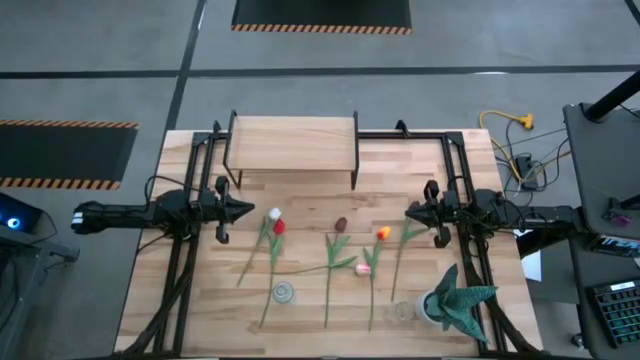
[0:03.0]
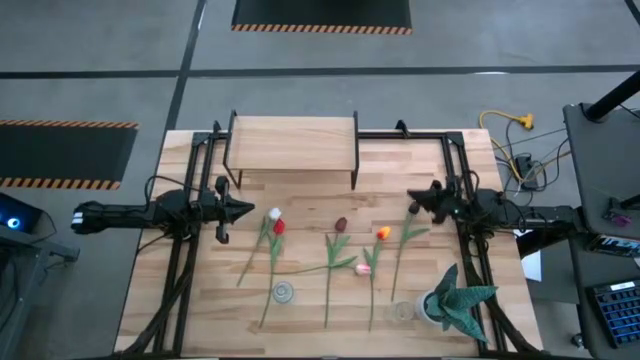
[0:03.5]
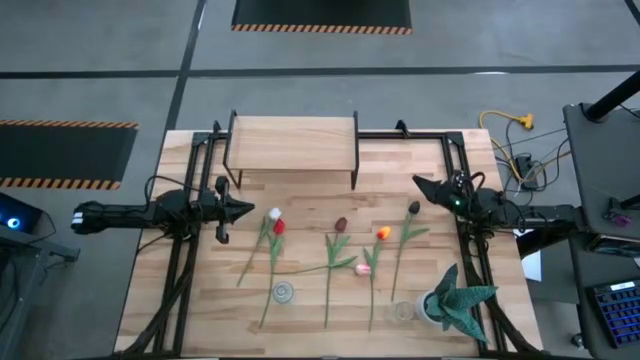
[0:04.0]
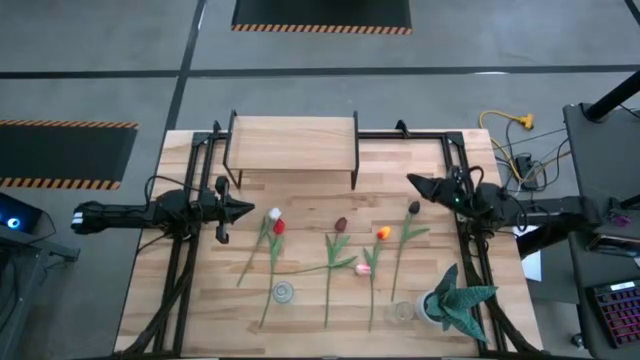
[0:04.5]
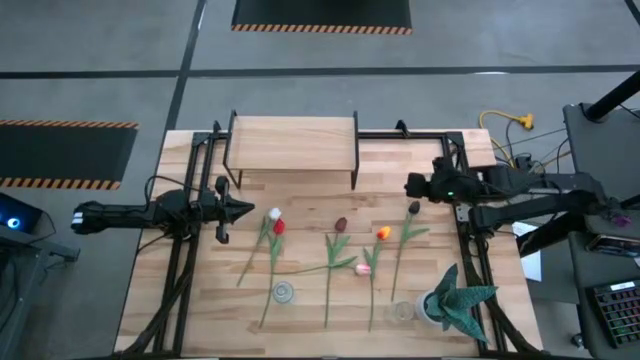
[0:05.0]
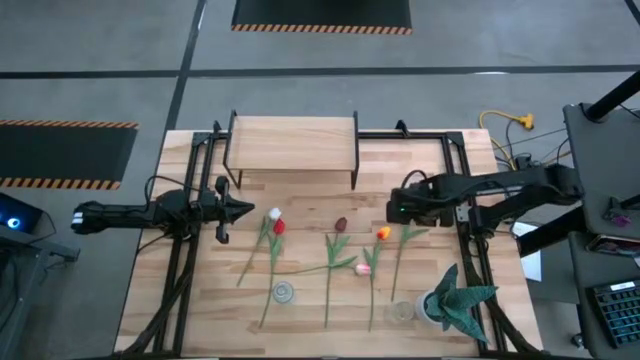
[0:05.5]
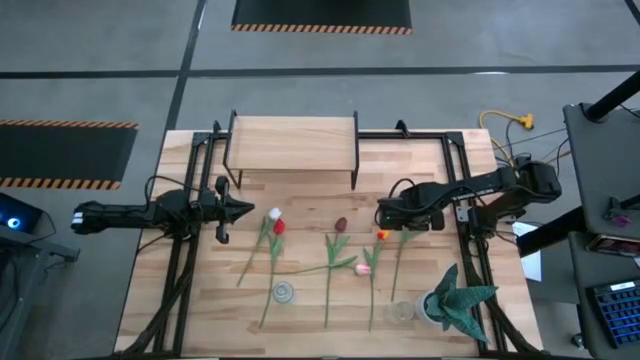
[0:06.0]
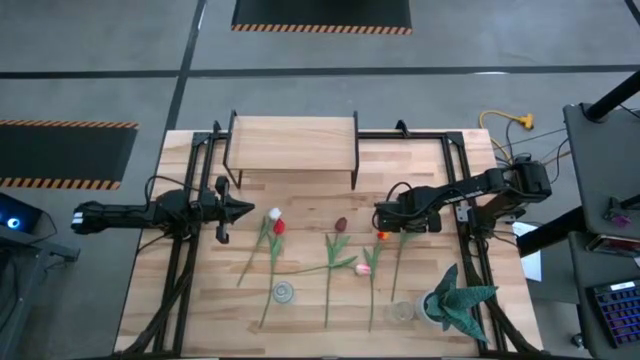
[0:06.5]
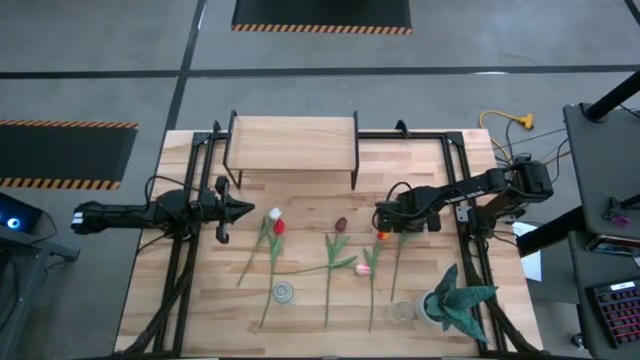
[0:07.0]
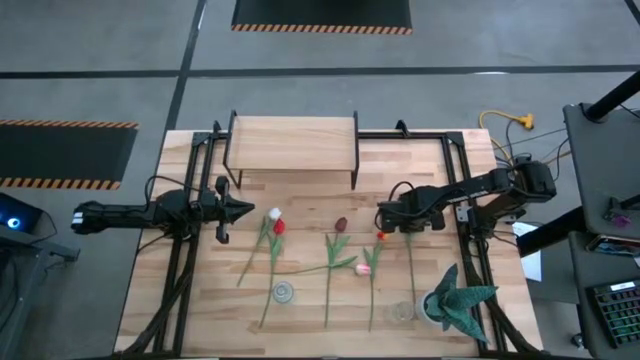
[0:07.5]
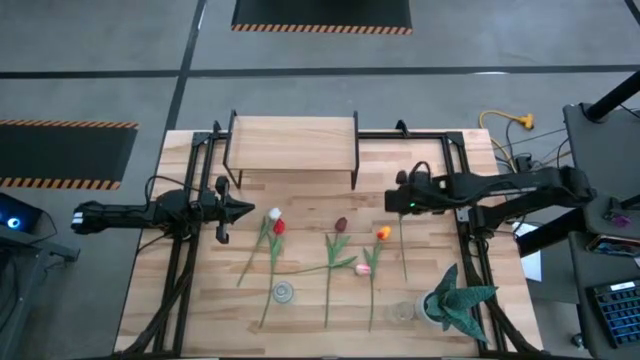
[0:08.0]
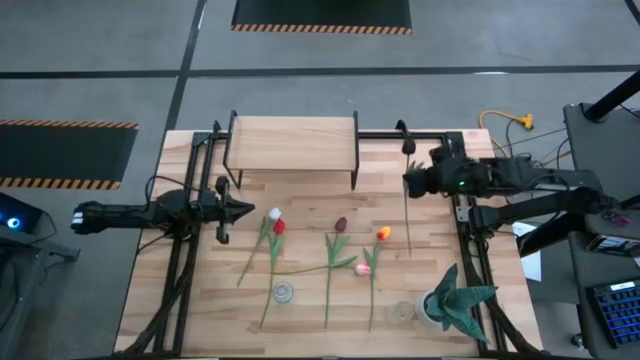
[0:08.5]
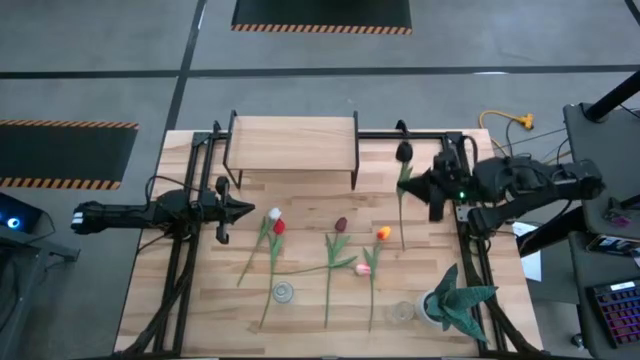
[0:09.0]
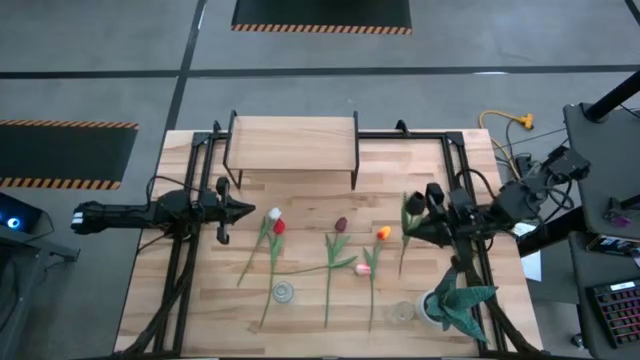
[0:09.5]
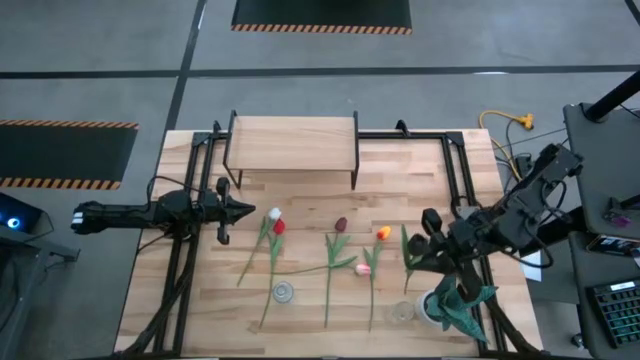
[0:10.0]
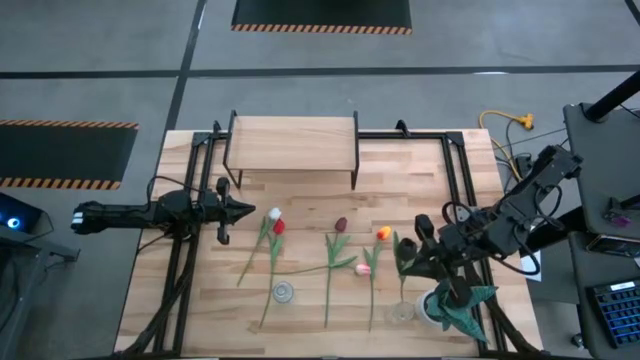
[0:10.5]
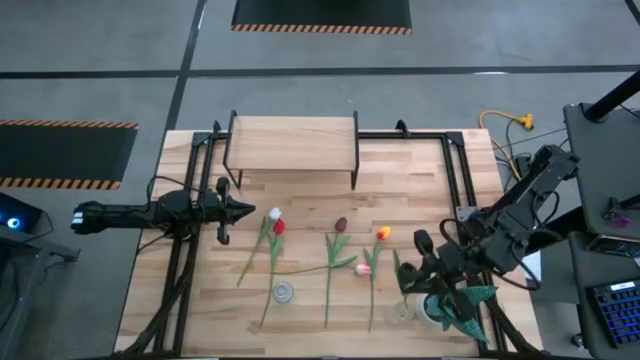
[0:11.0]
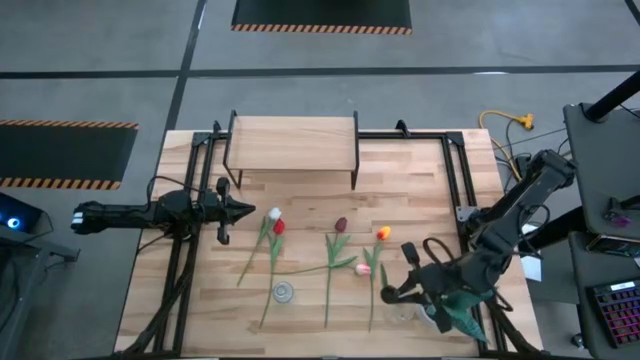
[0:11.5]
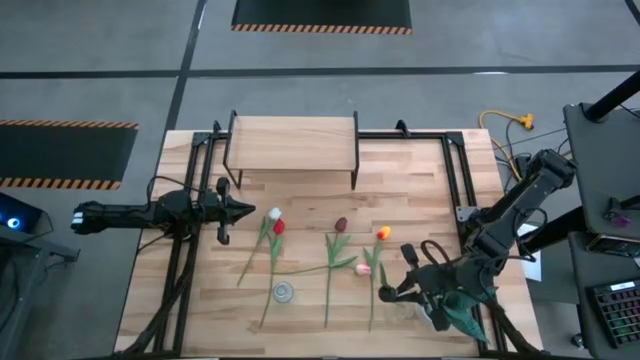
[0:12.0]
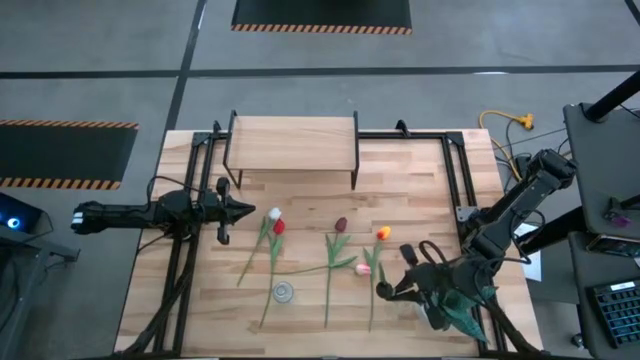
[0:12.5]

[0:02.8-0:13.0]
Task: Pick and place flowers into a vace then onto a shelf
Put the black flower into the right transparent vase

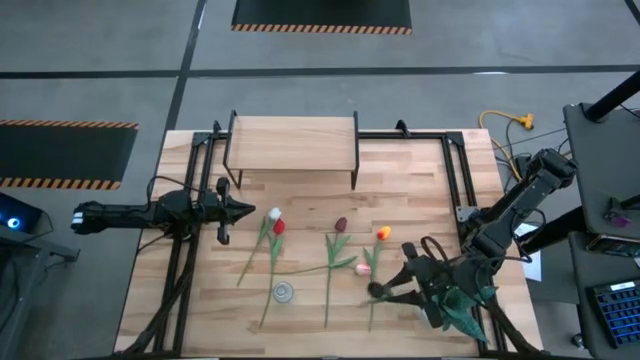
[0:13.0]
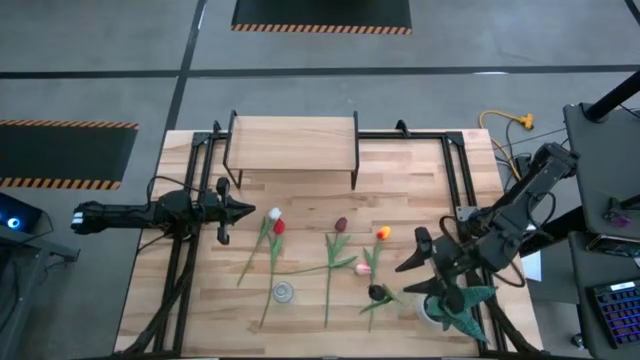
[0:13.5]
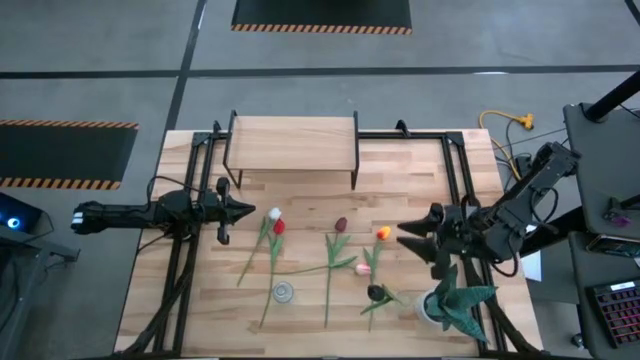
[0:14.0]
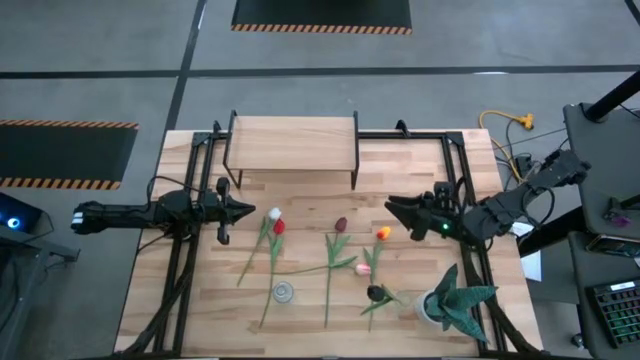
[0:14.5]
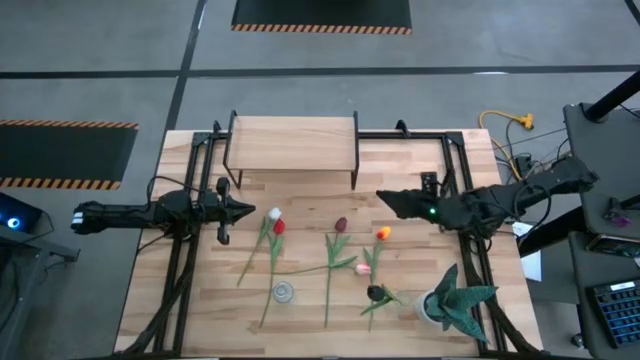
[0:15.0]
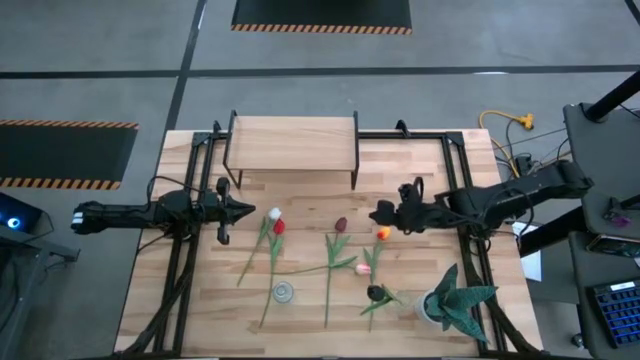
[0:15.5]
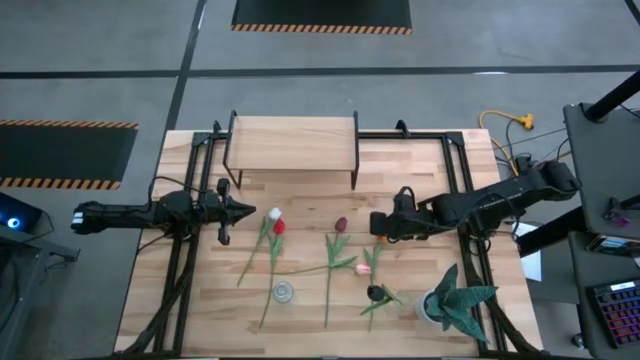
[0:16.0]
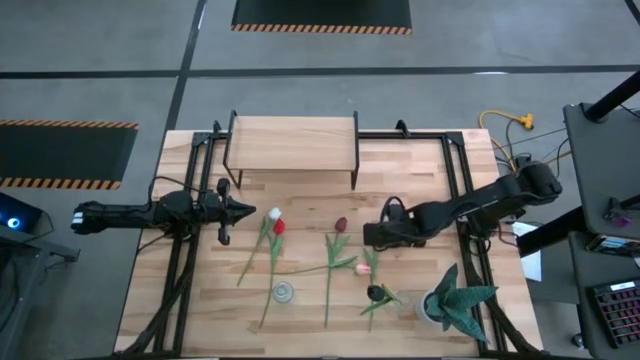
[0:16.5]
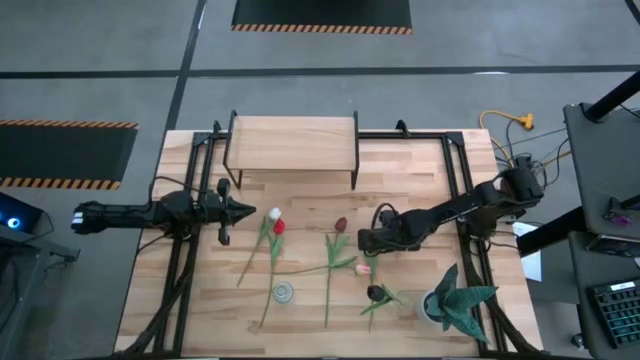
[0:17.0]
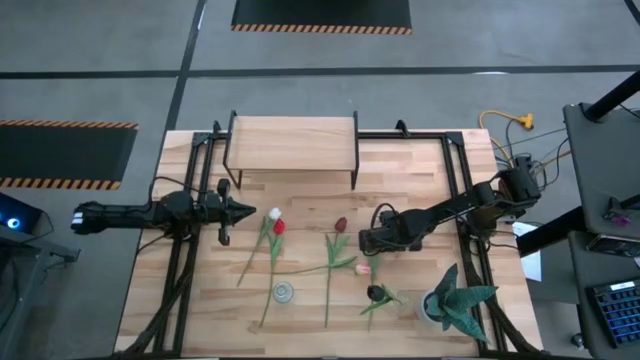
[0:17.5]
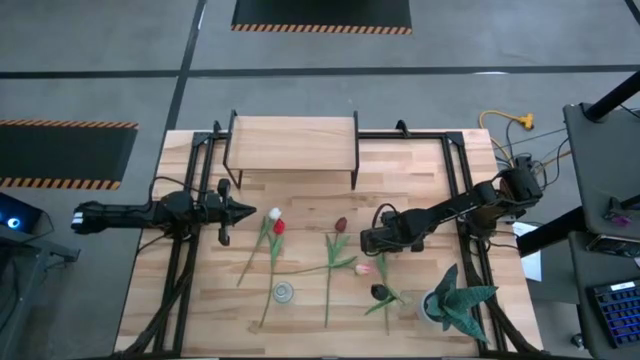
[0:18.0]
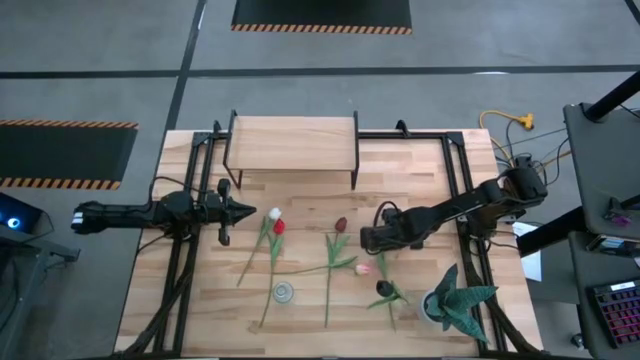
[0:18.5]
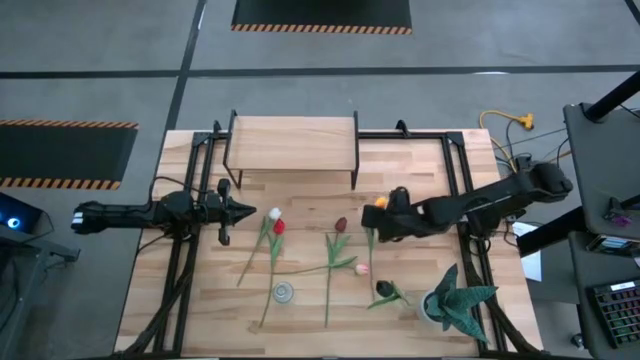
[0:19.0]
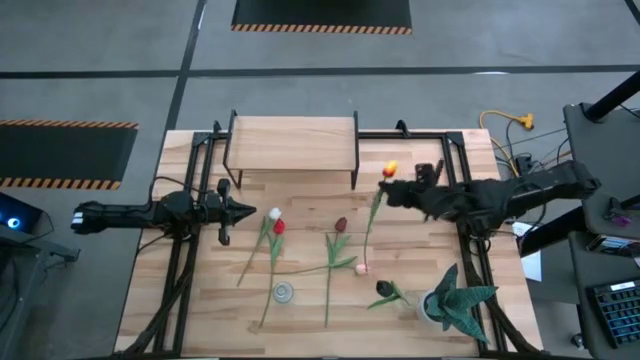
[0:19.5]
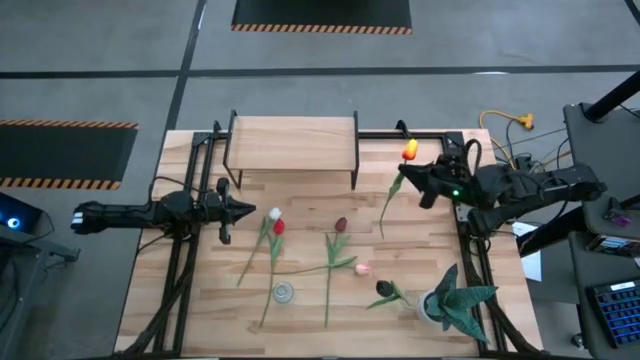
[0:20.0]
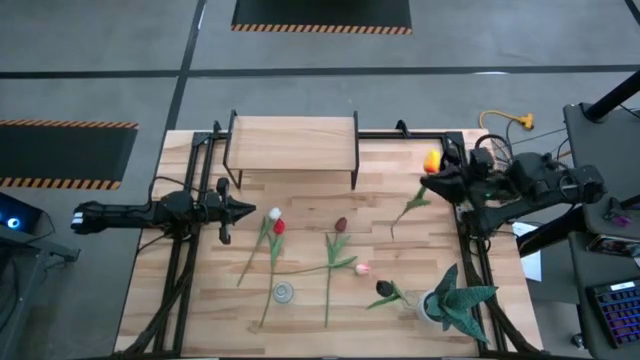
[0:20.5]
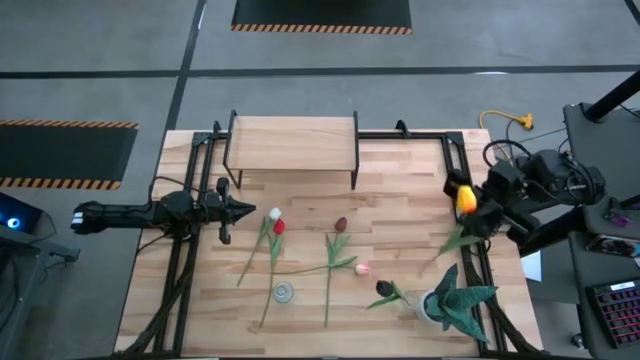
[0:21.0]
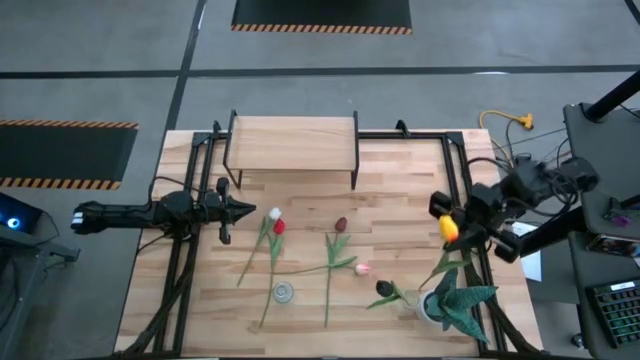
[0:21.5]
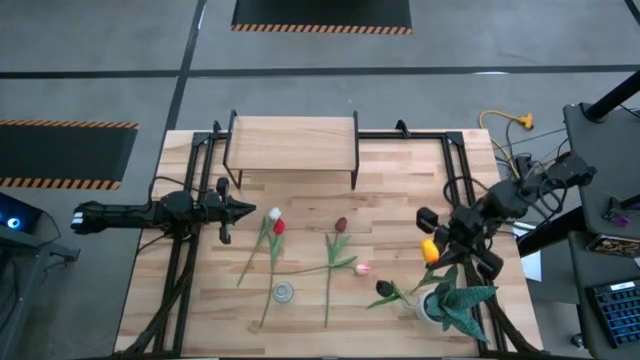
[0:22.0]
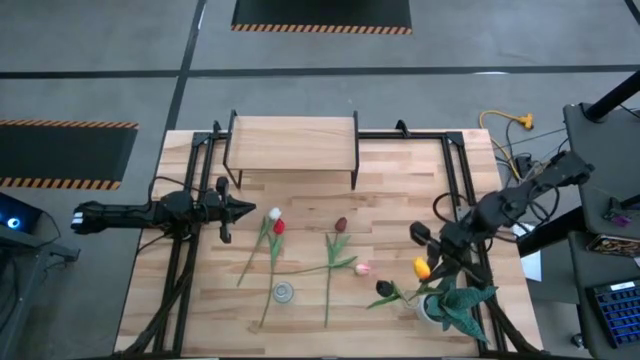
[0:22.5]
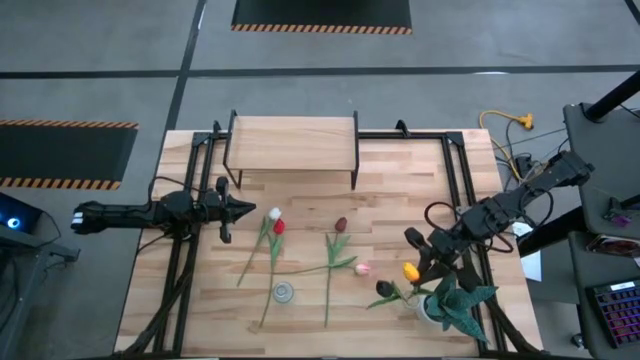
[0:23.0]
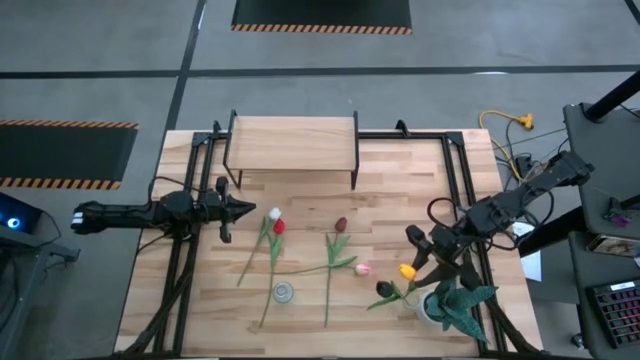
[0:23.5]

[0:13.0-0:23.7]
Put the yellow flower into the right transparent vase
